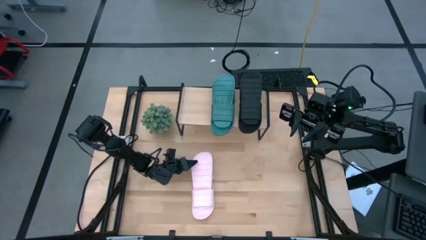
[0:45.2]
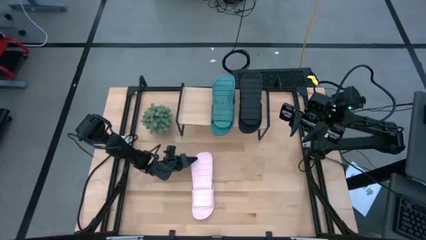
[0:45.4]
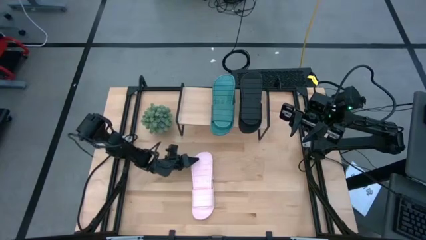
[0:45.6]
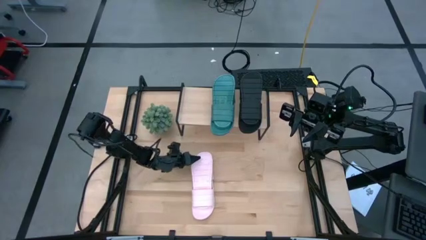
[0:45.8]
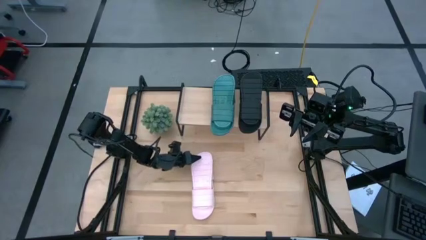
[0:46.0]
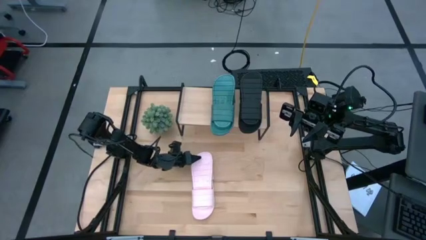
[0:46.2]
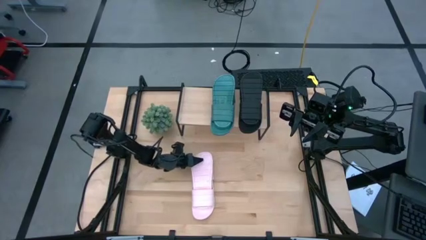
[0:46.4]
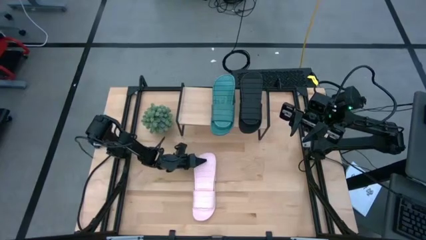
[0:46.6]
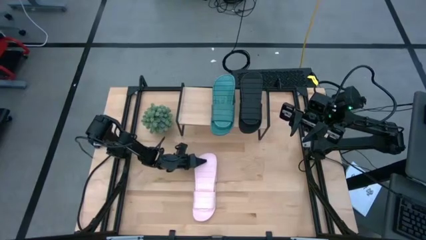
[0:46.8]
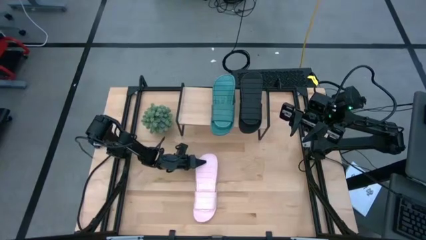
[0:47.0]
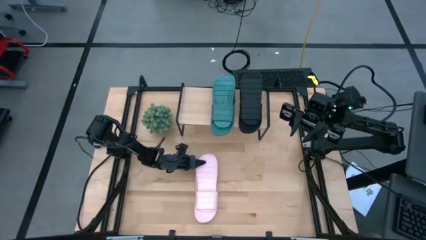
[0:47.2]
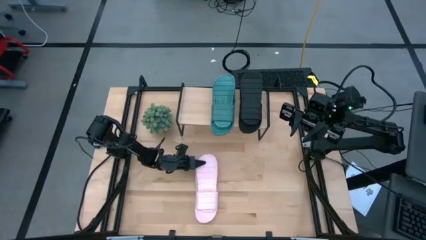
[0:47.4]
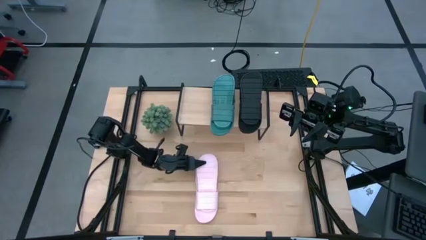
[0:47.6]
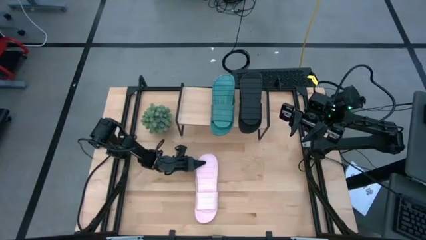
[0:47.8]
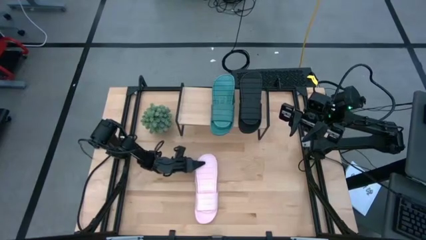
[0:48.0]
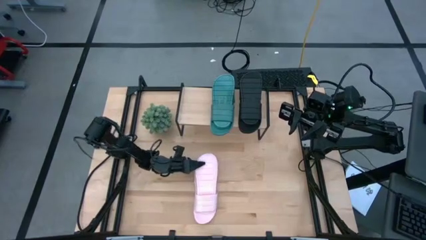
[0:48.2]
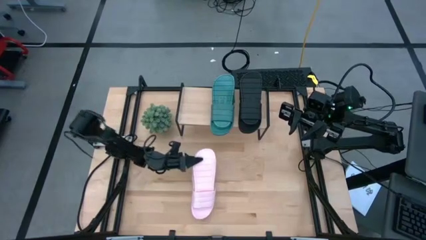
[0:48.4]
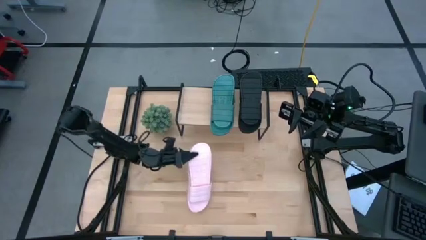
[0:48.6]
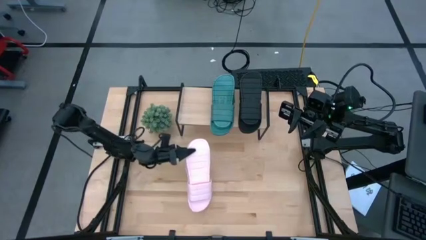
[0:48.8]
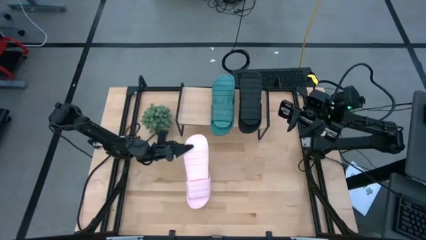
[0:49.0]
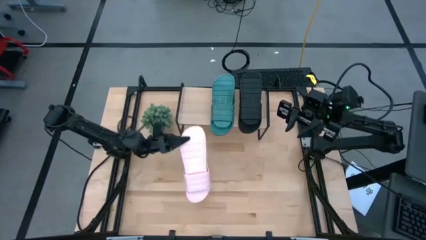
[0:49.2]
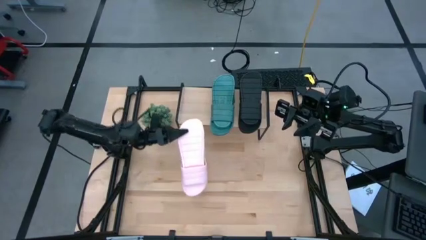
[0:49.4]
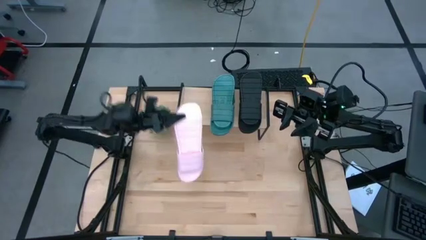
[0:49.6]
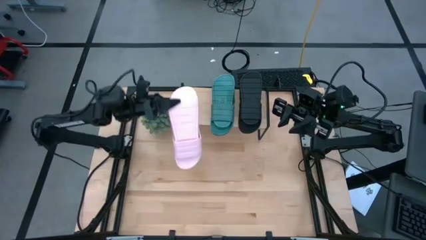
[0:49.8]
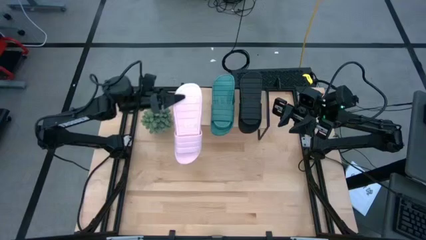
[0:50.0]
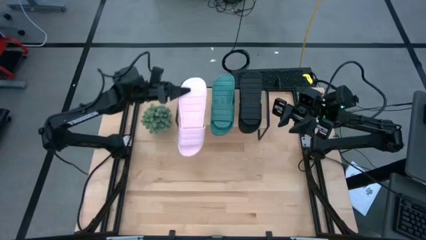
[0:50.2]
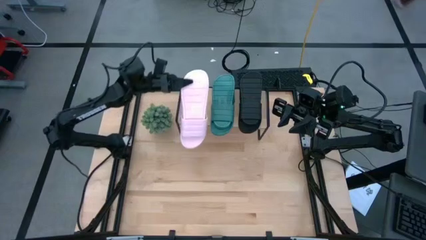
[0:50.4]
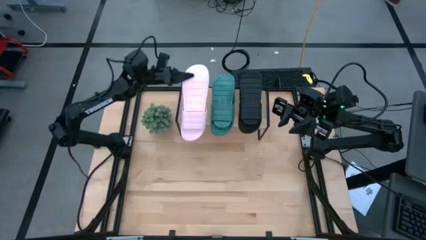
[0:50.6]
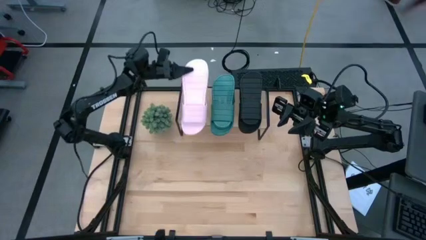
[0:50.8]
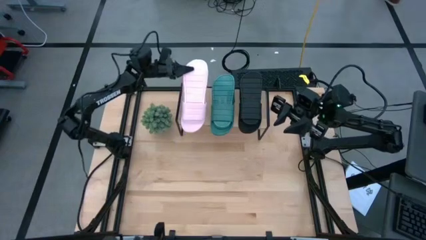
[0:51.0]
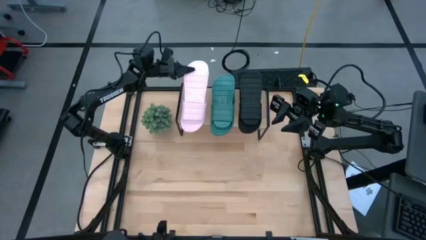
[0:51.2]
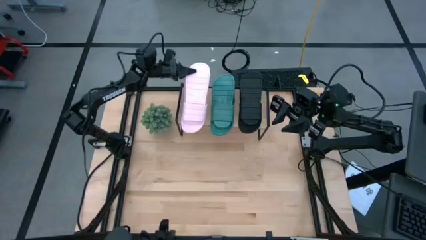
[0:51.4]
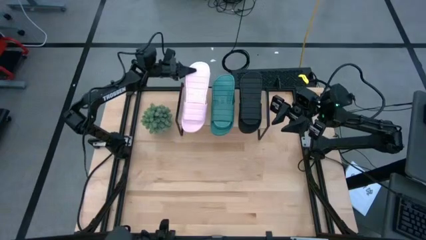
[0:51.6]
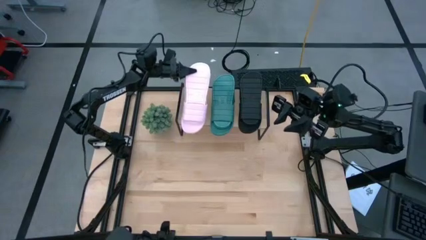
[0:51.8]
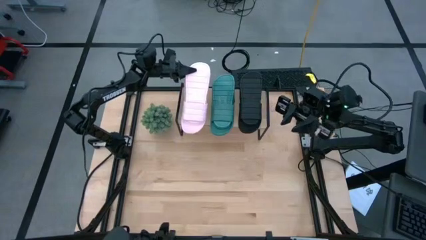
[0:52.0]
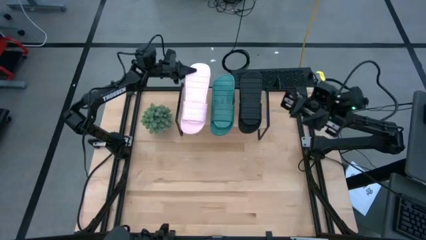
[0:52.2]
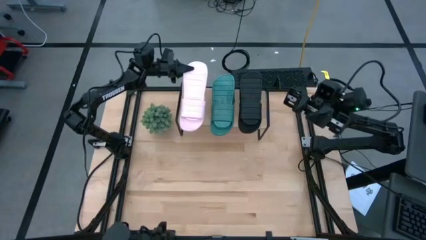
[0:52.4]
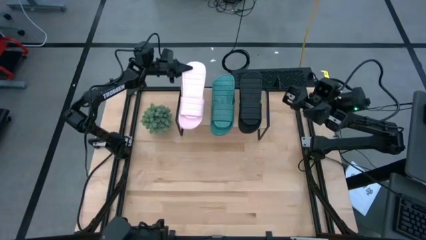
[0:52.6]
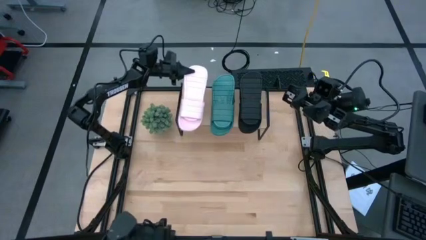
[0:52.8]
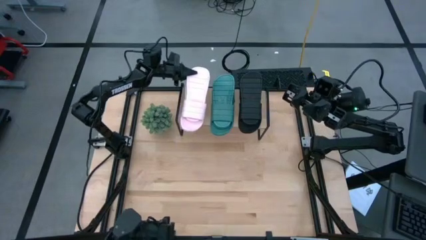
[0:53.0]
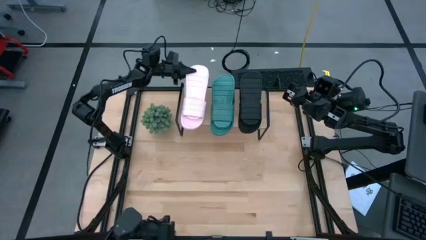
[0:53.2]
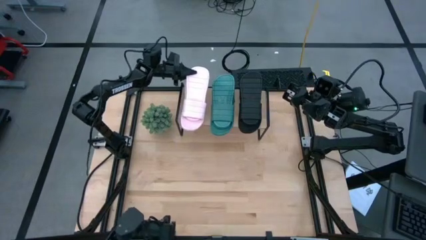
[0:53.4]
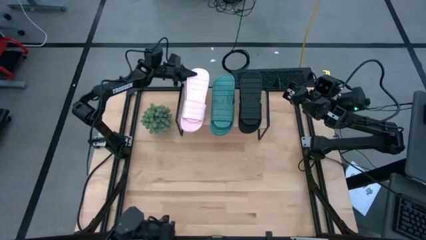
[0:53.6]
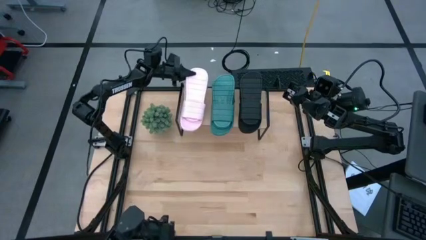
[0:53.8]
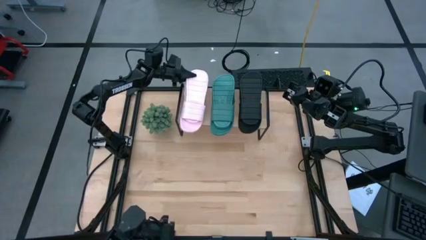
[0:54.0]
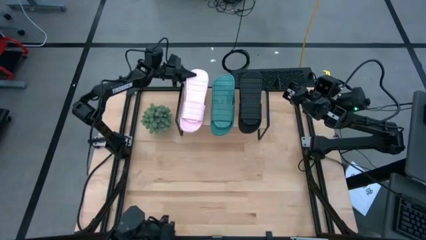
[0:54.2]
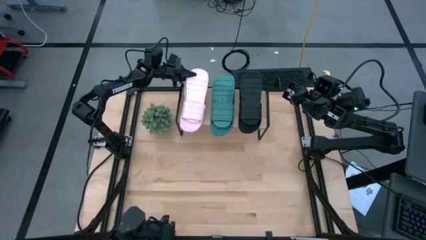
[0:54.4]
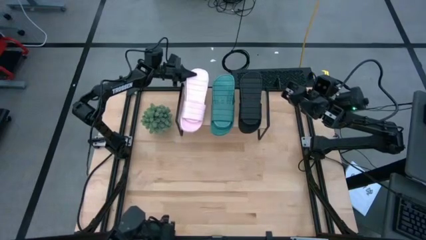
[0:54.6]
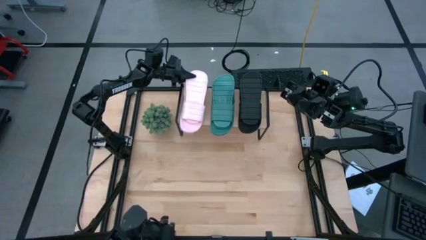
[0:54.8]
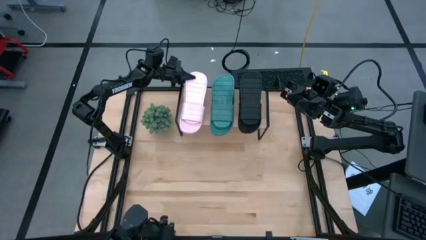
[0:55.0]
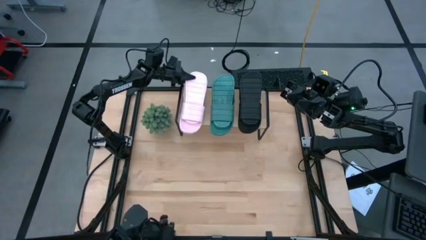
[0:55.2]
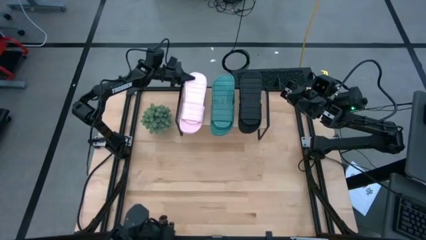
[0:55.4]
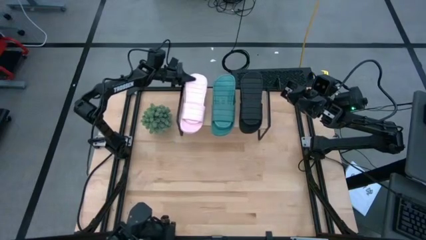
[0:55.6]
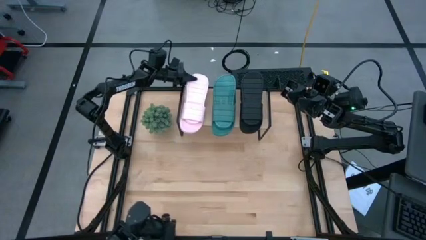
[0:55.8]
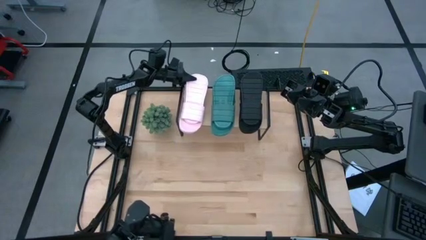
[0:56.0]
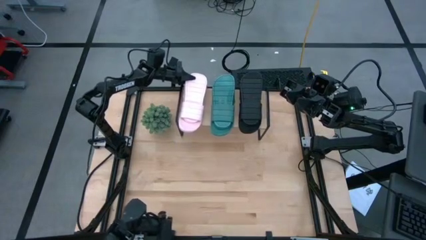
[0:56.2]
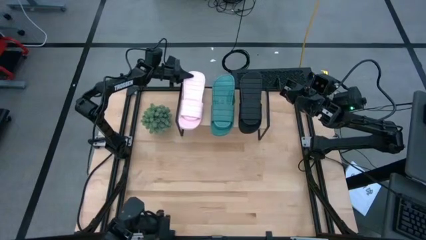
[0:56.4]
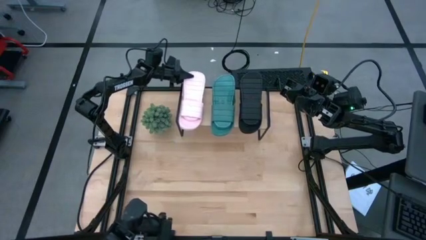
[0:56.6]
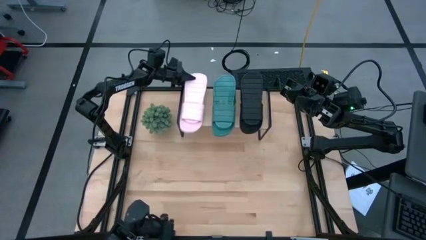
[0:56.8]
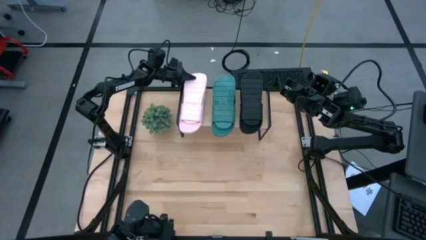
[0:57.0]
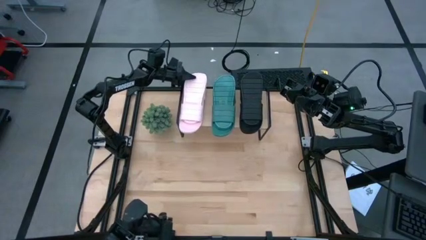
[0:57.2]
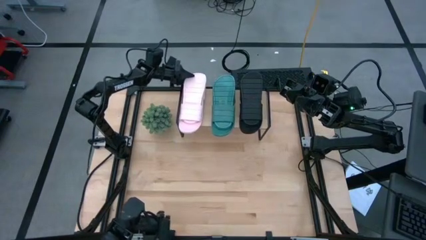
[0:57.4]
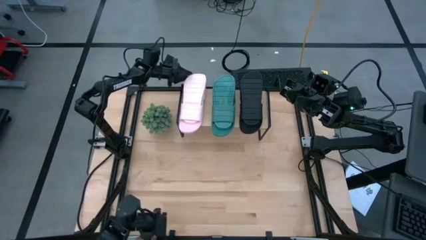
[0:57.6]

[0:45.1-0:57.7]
Task: Pick and place slides into the shelf
Put the pair of pink slides on the shelf

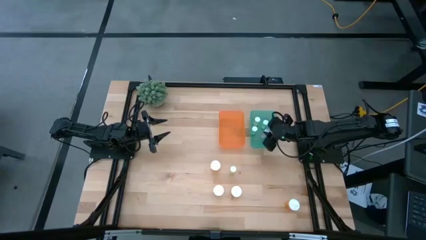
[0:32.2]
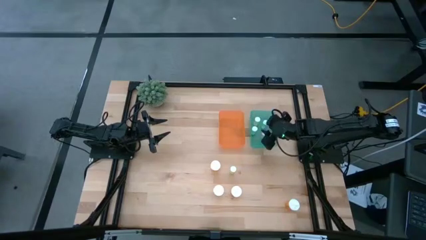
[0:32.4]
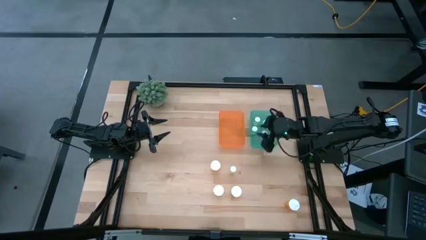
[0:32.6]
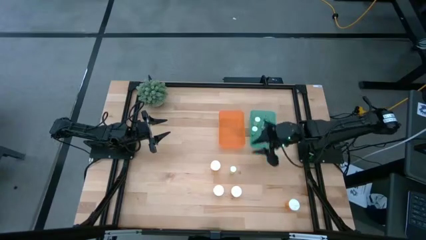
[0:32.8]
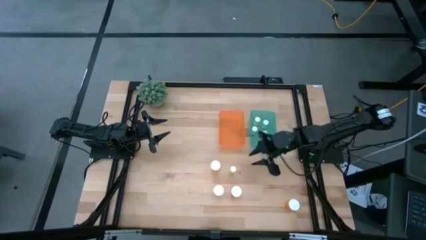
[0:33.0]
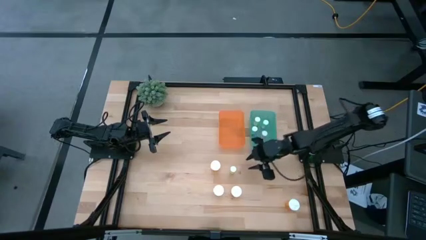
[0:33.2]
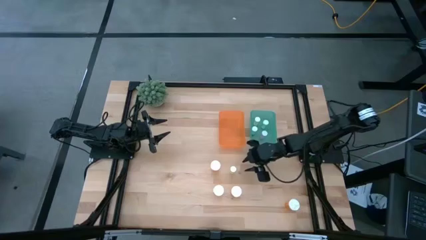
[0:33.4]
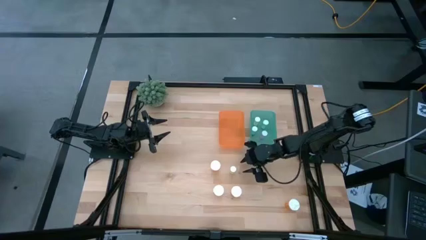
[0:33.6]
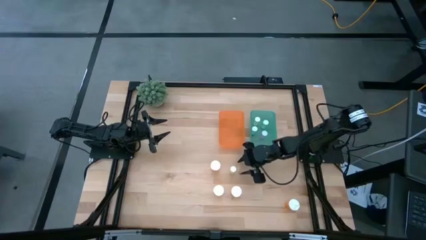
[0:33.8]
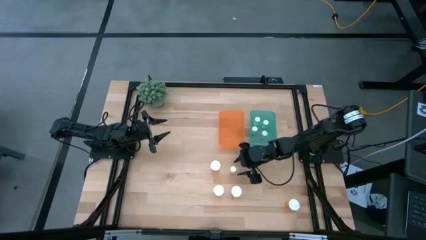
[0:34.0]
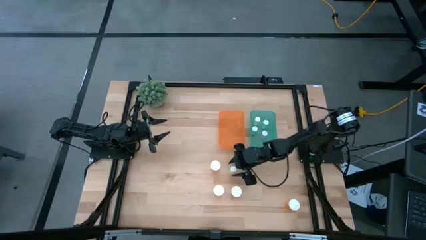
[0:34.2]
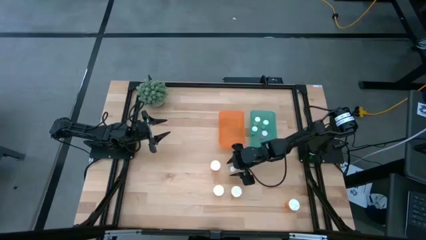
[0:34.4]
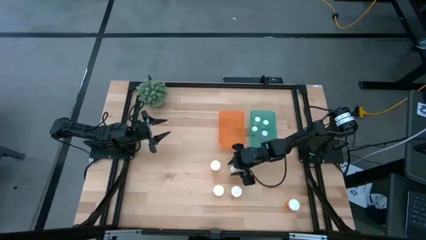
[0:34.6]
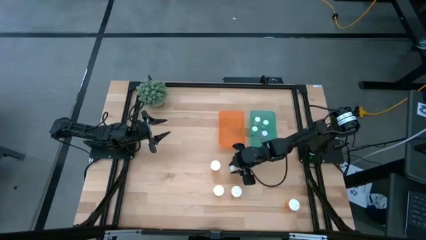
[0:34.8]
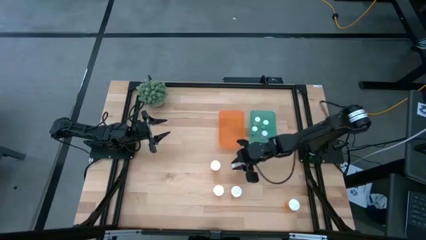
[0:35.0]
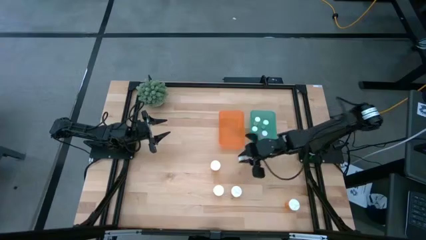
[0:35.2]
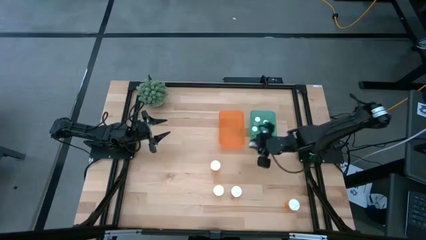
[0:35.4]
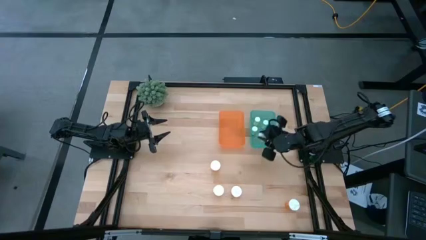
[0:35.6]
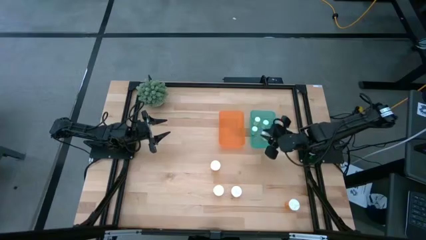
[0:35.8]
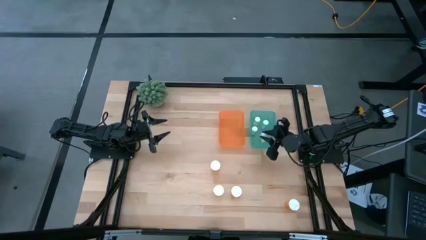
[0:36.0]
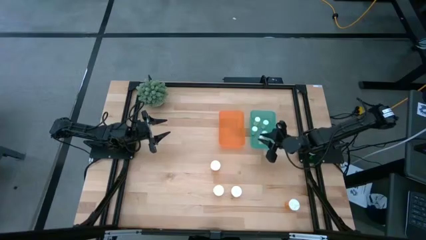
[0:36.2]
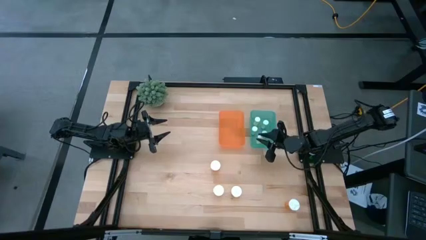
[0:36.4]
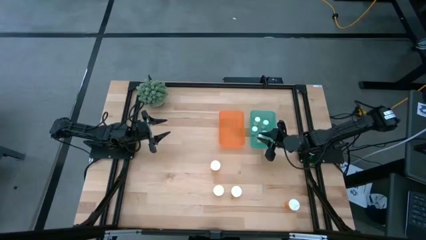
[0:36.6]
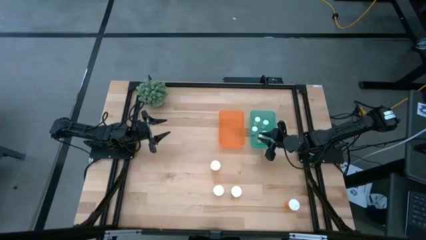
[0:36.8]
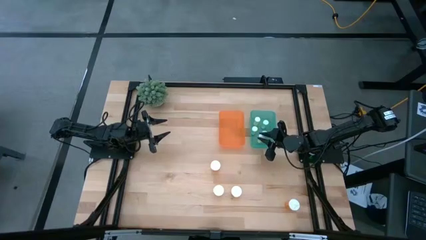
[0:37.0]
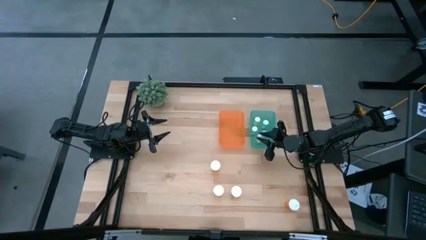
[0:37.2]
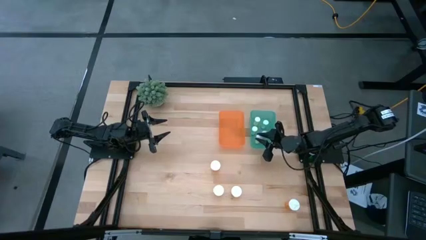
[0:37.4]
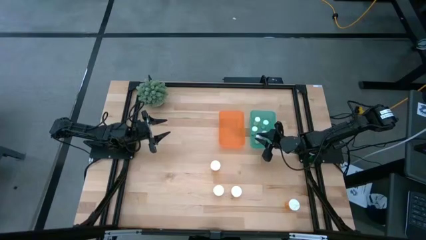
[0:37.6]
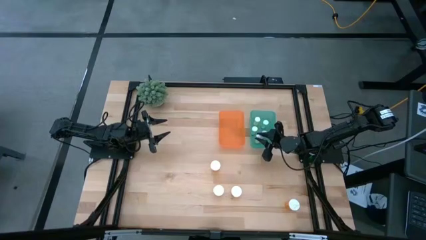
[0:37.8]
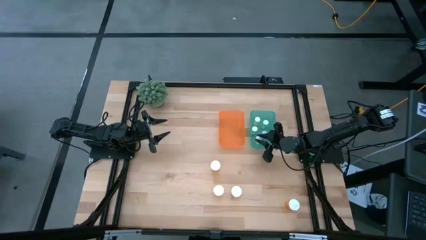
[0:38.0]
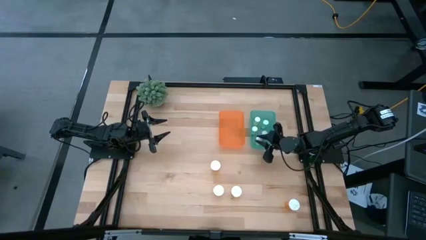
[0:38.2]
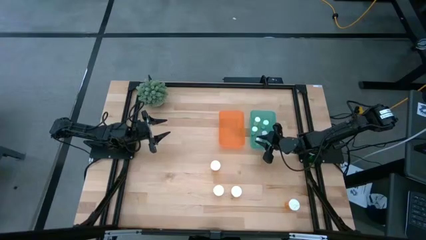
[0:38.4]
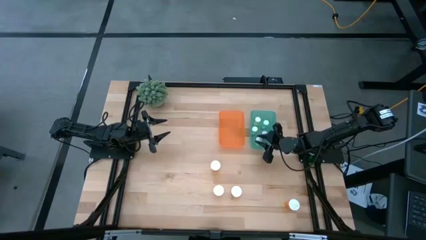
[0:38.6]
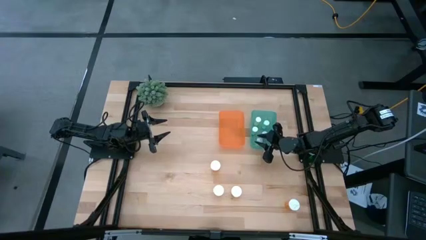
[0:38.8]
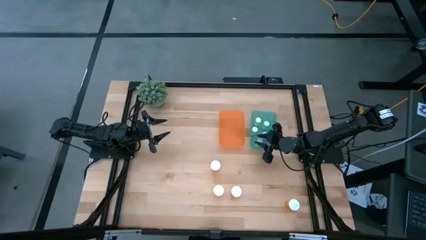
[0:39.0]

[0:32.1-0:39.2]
Task: Pick and place medicine bottles into bin by pill shape (circle, oval)
Put the small yellow pill bottle into the green bin
